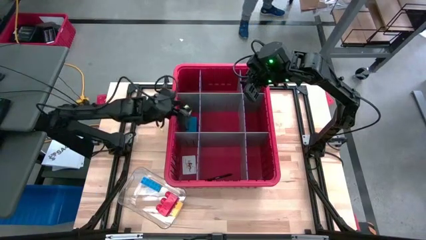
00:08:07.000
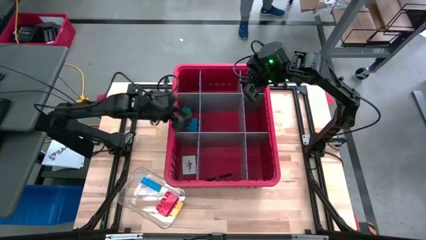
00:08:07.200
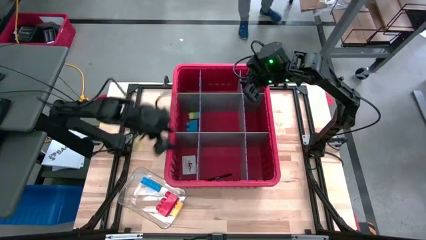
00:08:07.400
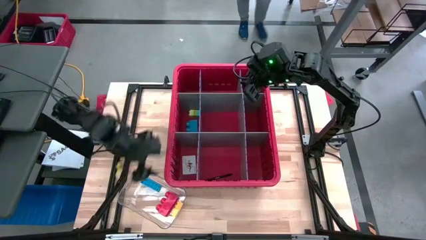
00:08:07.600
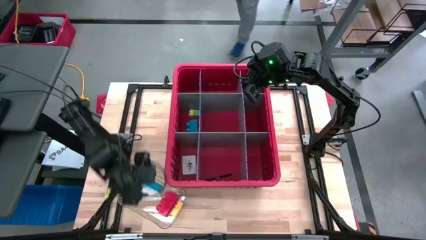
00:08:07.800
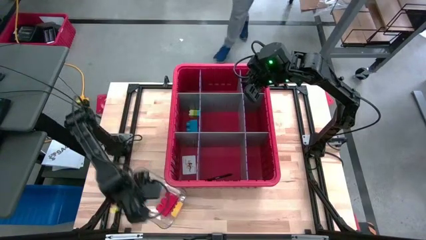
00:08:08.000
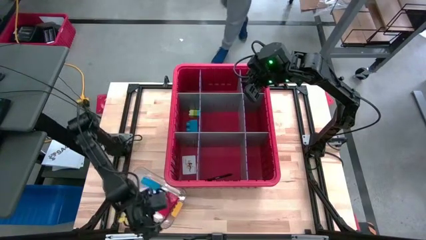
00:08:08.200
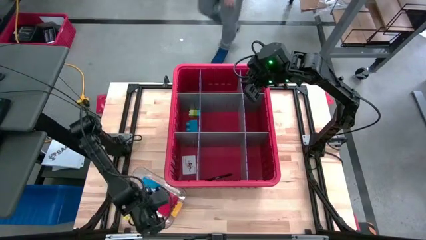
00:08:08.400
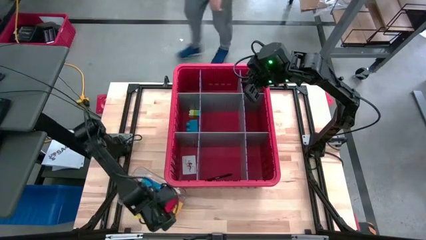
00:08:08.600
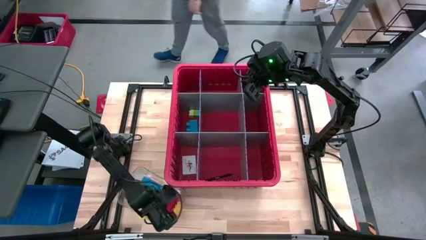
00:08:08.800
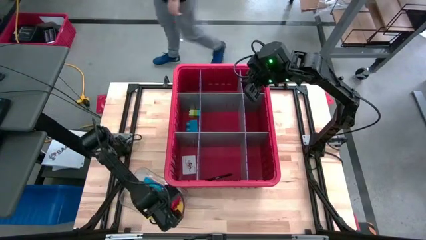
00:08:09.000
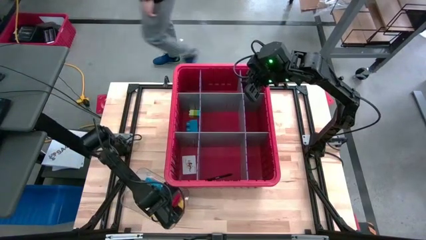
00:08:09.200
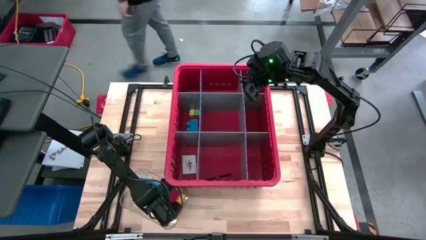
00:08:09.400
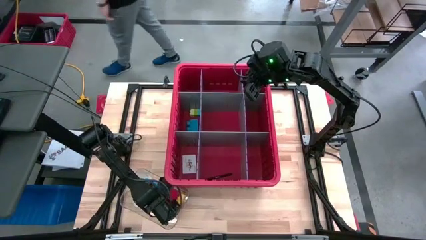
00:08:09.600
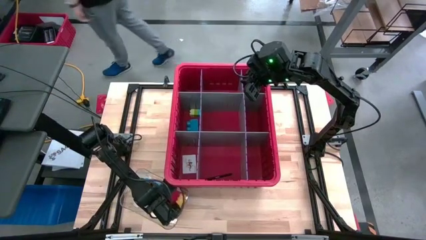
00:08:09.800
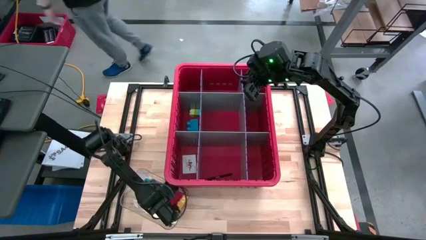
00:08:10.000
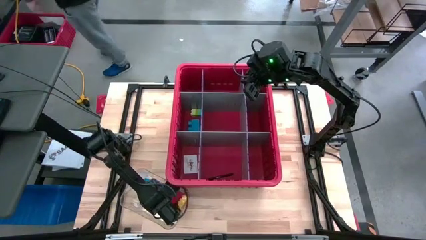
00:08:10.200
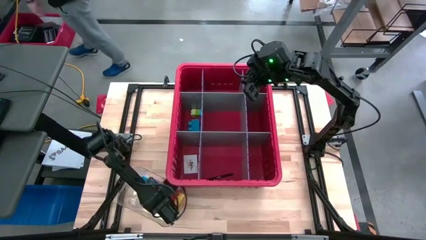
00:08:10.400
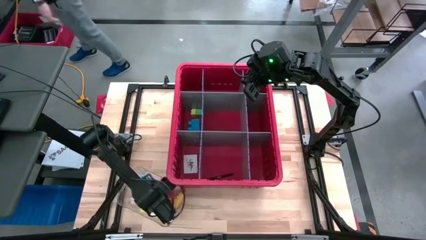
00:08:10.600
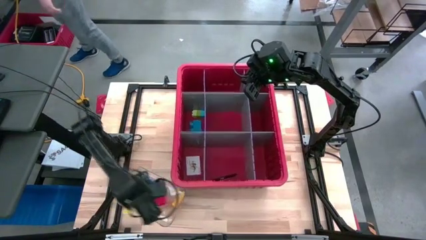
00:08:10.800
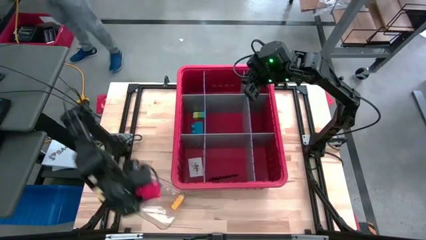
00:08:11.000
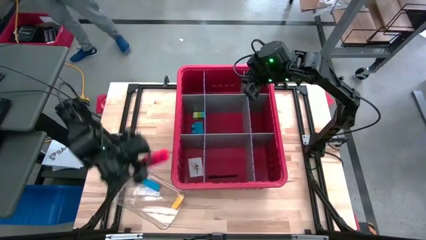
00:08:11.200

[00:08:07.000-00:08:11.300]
Task: Sort blocks
Put the orange block into the bin

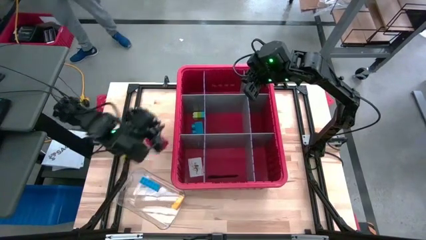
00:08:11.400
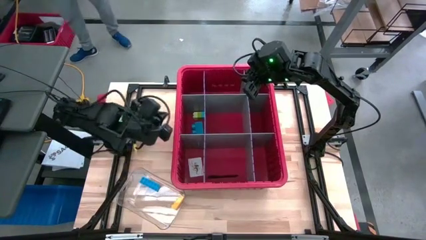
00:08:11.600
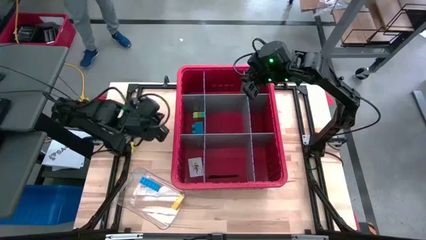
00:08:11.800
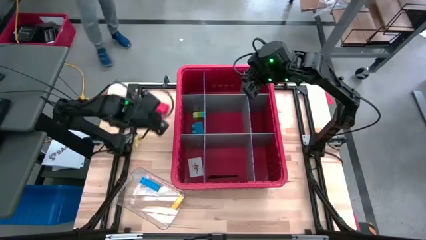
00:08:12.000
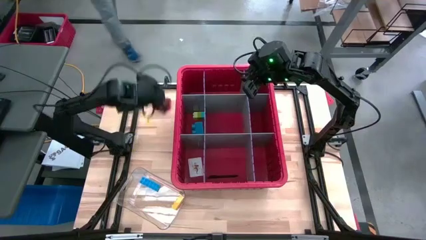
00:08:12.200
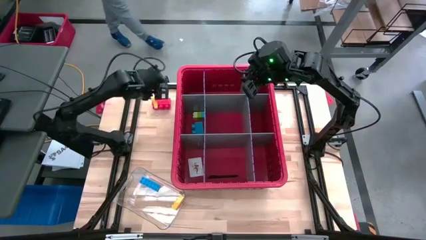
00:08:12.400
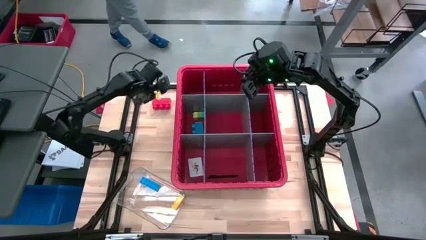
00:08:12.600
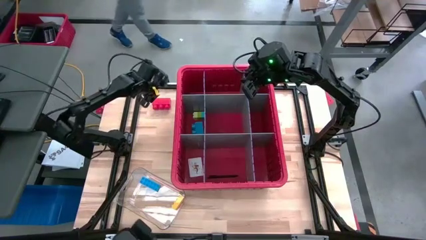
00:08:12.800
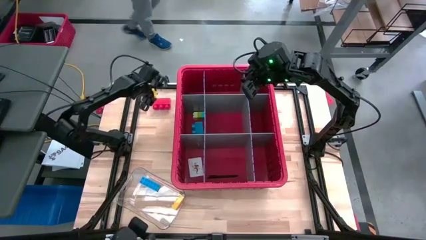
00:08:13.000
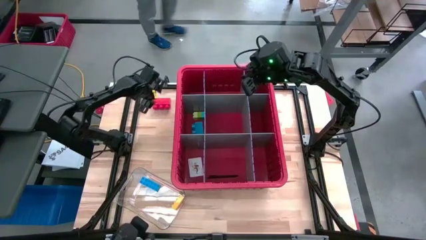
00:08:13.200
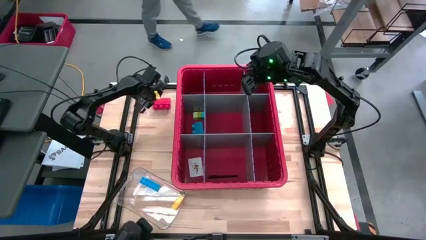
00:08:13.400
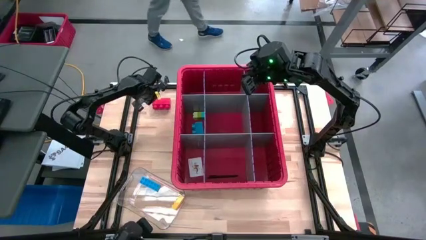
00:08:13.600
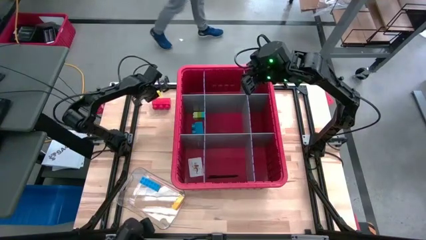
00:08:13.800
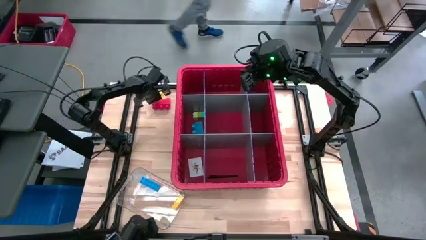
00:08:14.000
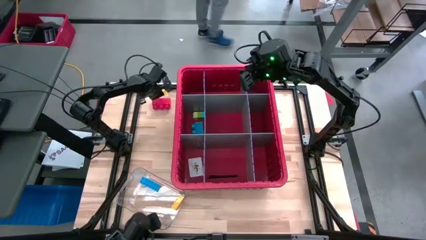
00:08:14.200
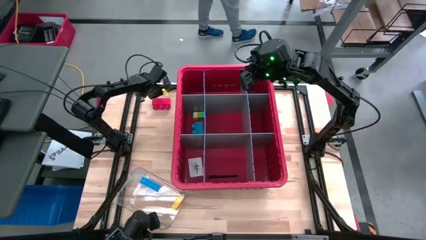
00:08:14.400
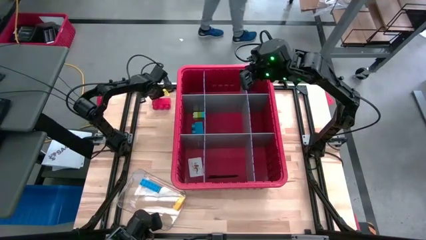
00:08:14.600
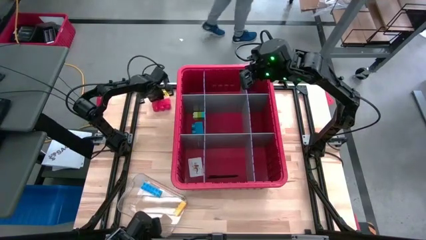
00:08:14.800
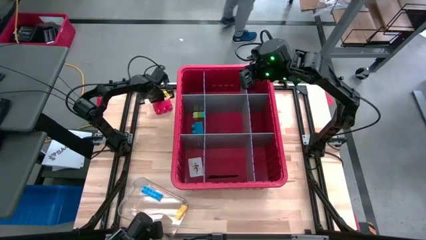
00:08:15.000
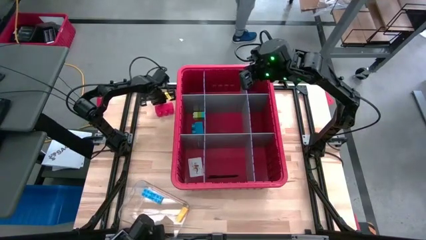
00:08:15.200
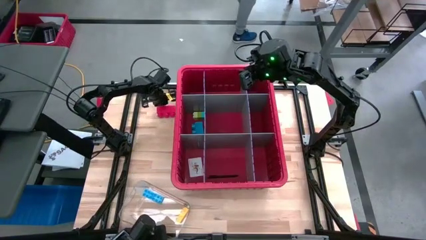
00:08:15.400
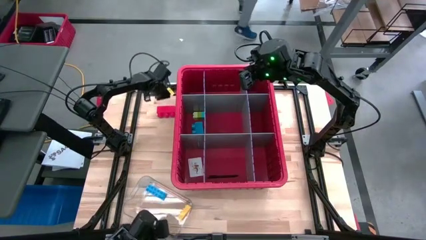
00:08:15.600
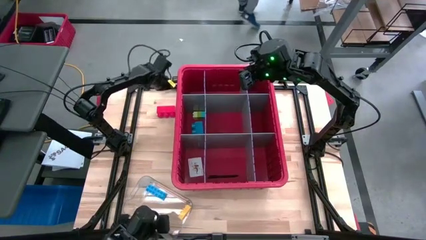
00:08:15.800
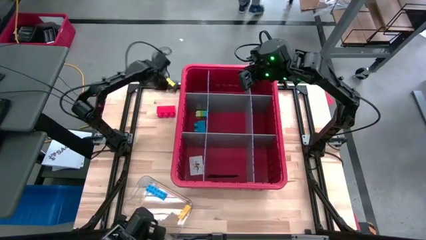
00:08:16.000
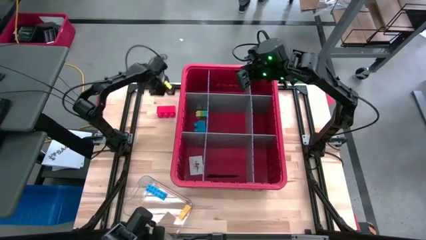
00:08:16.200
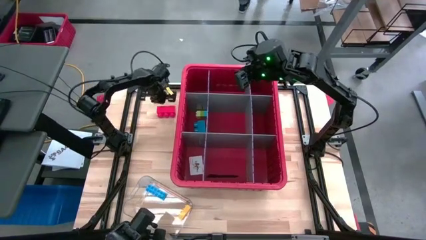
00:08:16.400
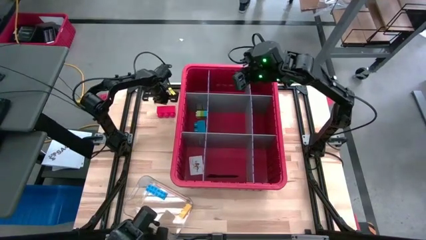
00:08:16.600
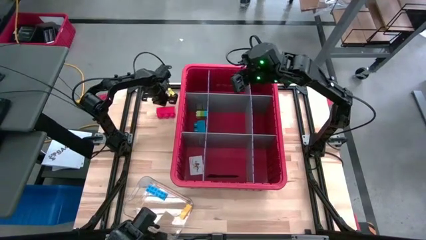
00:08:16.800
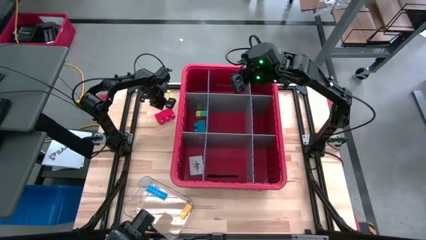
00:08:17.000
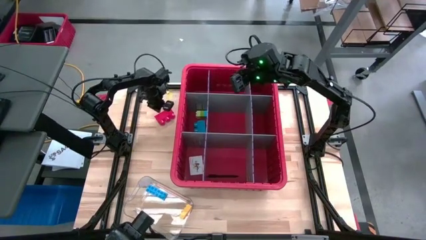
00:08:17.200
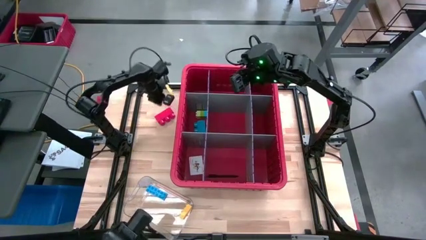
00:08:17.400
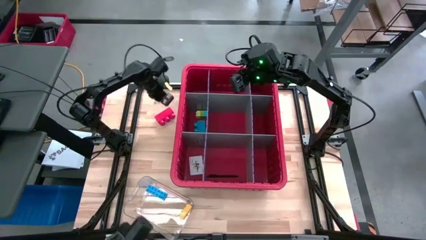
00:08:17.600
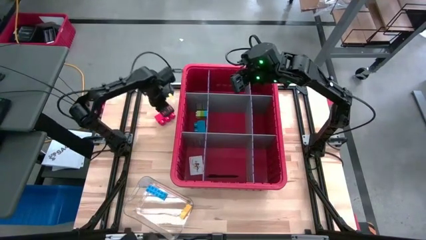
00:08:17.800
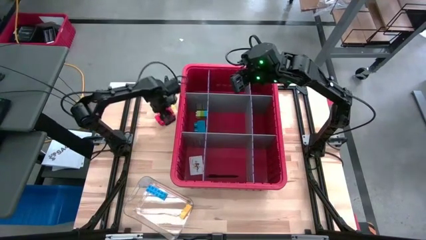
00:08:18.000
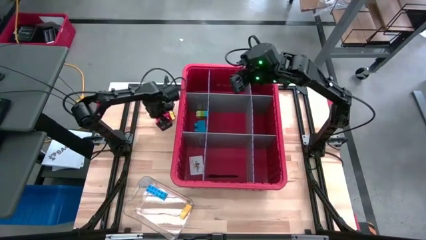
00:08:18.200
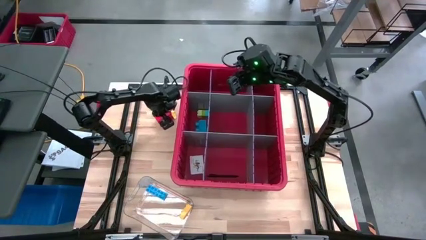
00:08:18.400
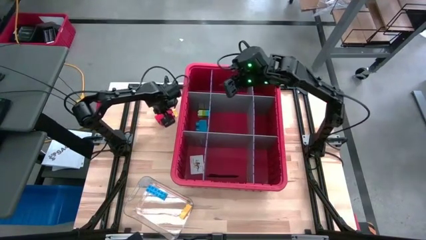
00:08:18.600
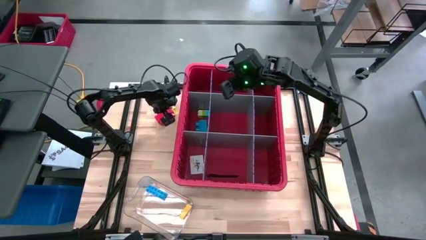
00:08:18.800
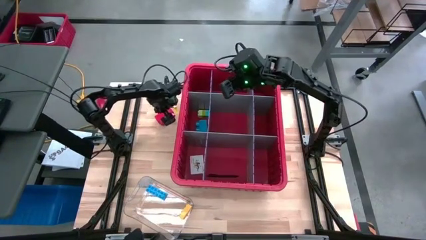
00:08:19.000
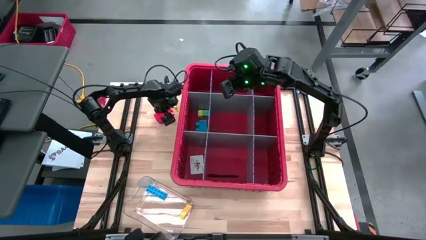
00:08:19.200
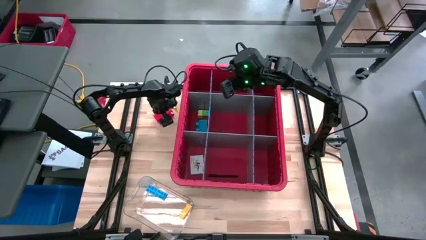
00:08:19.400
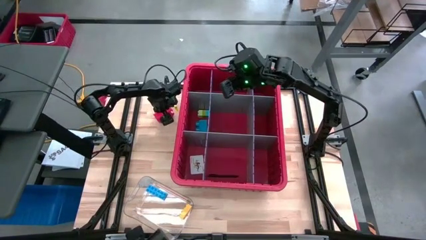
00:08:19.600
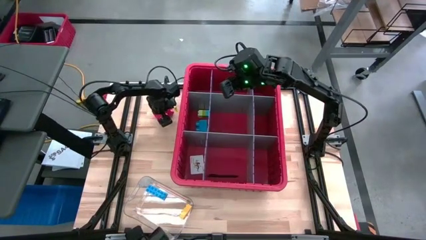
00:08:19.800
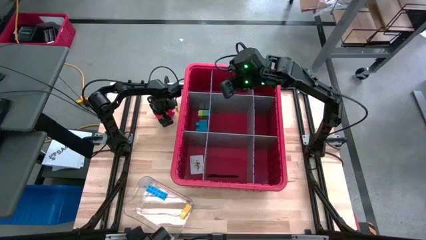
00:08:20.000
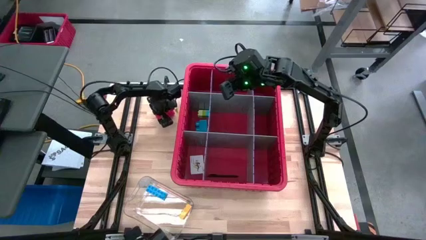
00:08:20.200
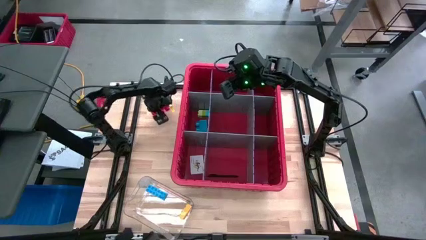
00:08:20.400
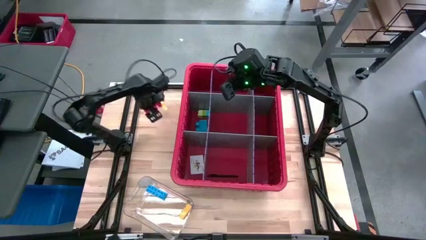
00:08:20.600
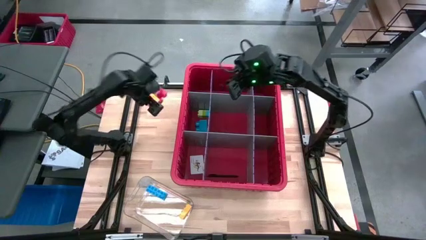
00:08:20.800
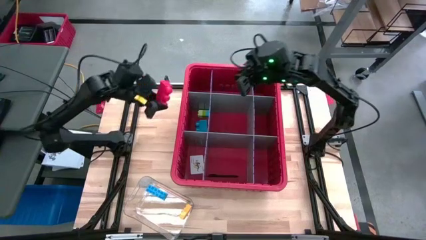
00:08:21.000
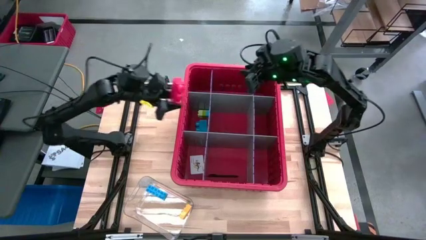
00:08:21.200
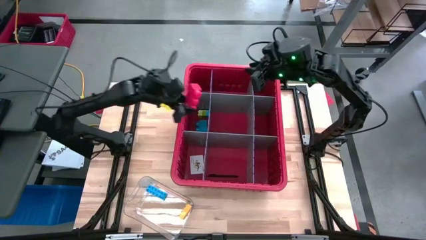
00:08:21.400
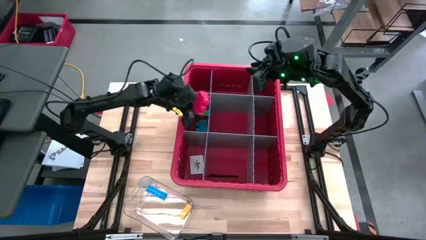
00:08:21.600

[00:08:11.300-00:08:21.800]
Put the orange block into the bin
